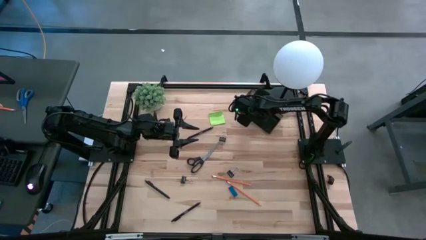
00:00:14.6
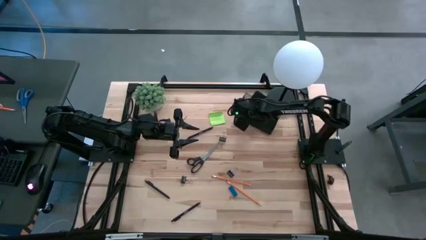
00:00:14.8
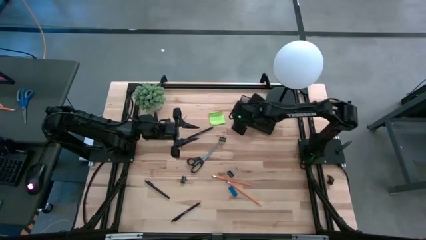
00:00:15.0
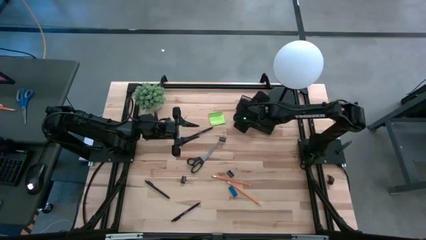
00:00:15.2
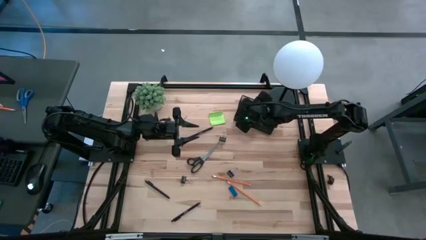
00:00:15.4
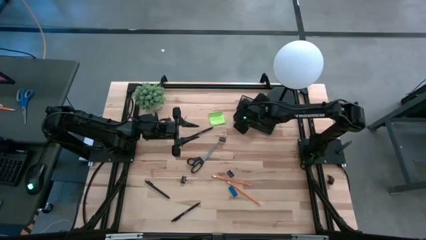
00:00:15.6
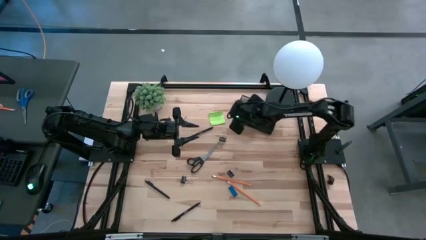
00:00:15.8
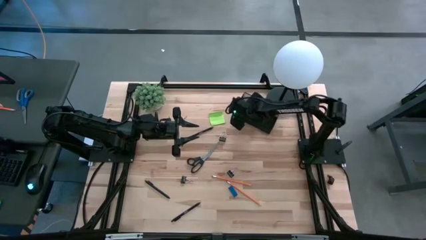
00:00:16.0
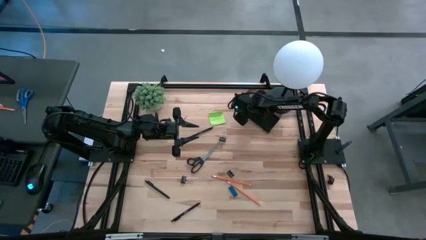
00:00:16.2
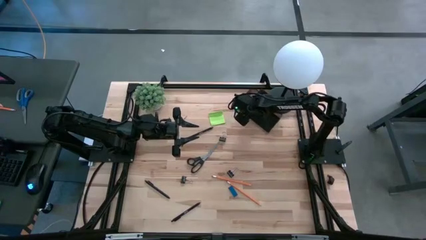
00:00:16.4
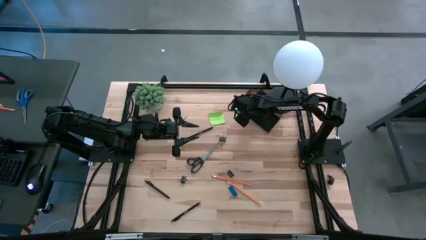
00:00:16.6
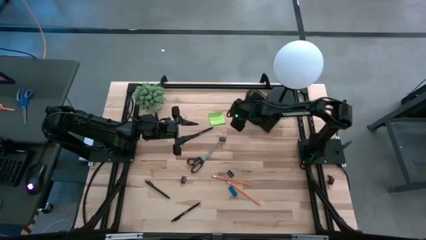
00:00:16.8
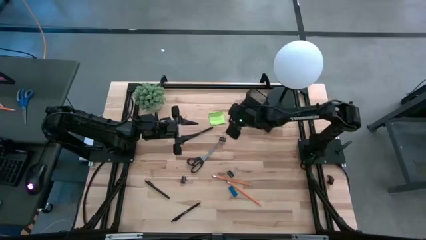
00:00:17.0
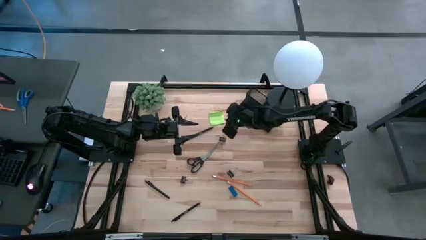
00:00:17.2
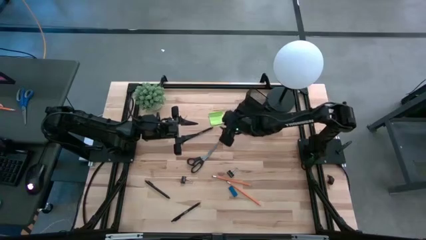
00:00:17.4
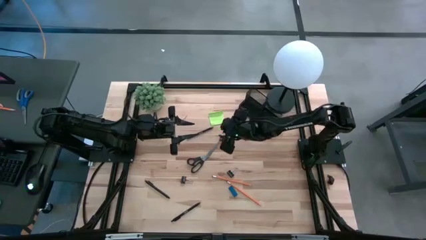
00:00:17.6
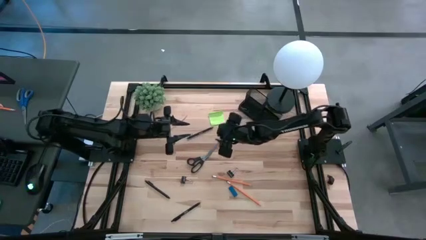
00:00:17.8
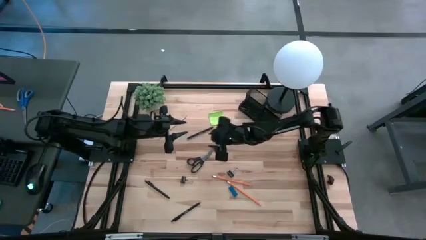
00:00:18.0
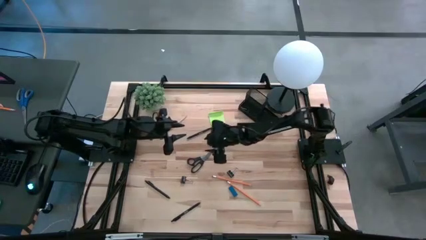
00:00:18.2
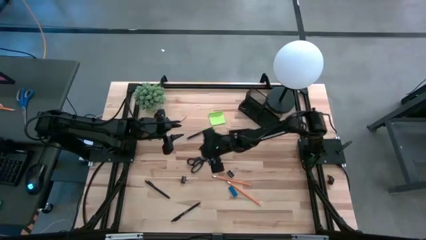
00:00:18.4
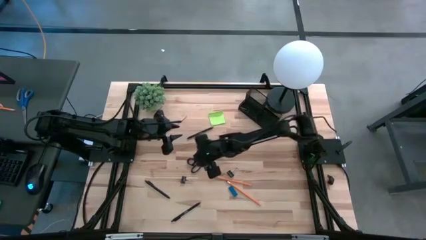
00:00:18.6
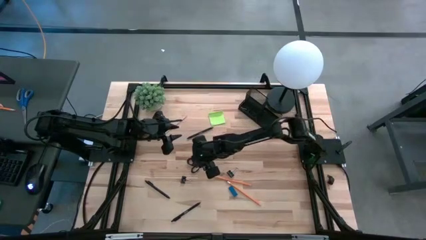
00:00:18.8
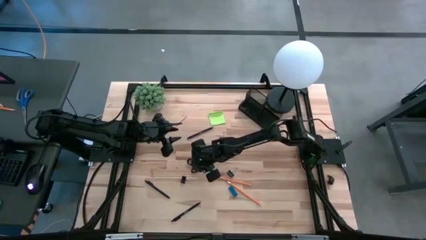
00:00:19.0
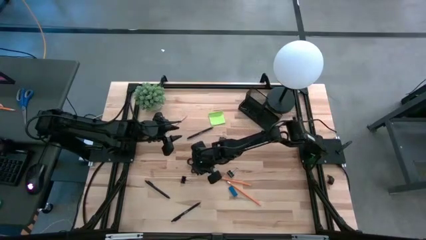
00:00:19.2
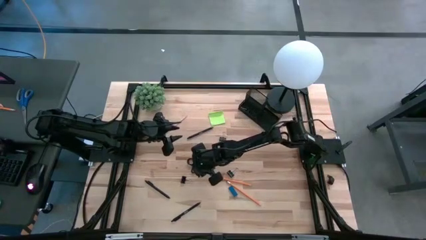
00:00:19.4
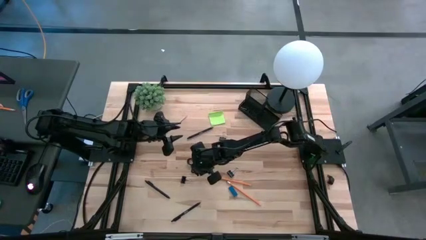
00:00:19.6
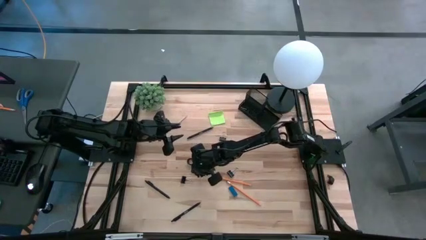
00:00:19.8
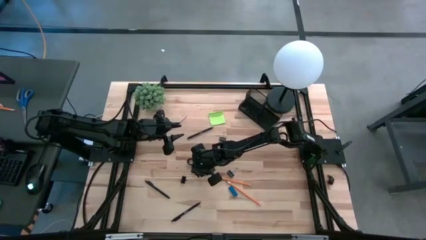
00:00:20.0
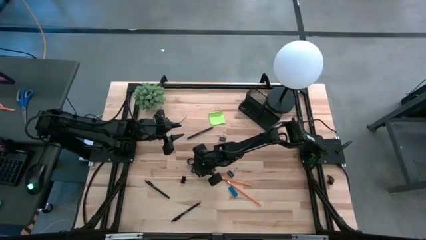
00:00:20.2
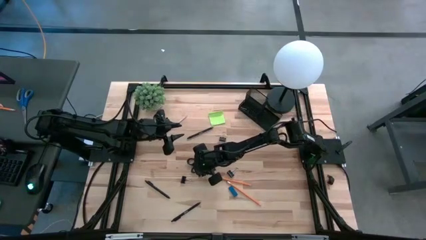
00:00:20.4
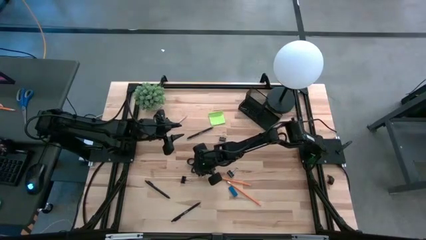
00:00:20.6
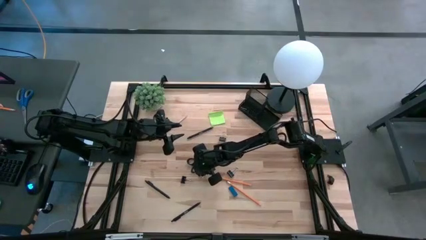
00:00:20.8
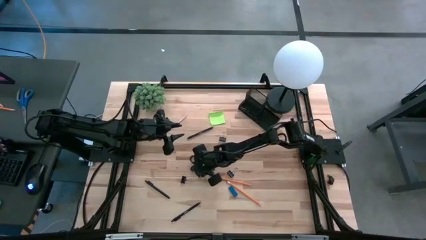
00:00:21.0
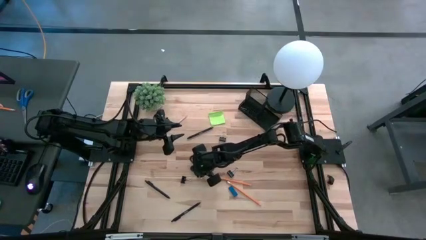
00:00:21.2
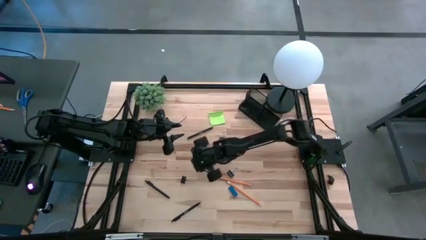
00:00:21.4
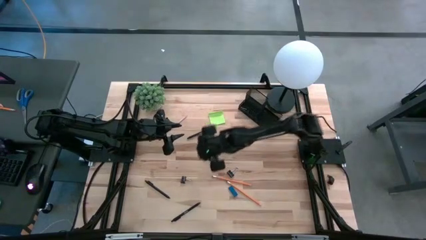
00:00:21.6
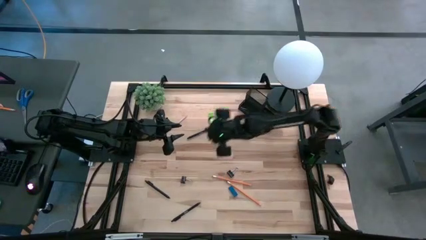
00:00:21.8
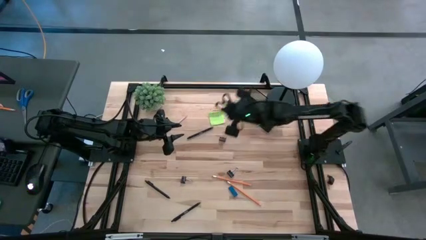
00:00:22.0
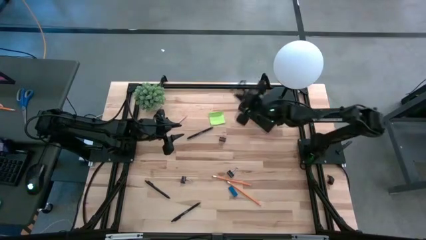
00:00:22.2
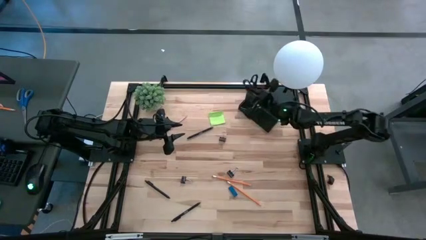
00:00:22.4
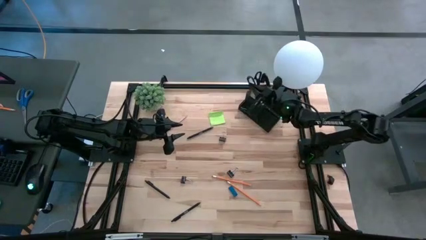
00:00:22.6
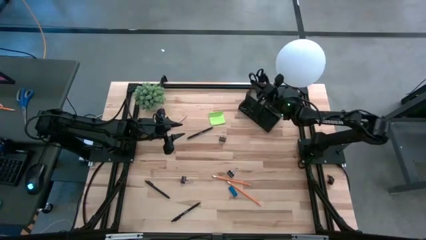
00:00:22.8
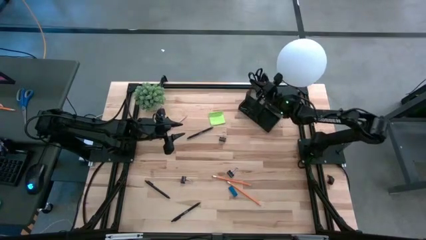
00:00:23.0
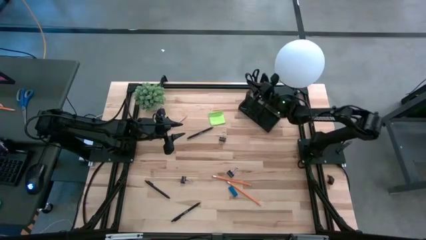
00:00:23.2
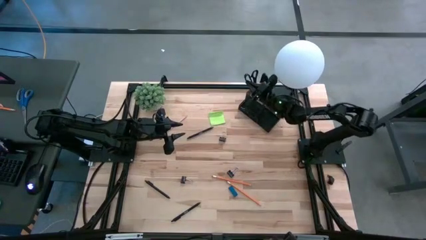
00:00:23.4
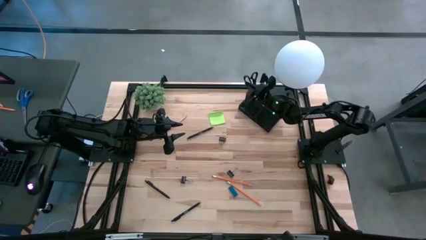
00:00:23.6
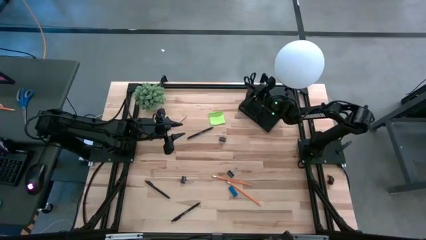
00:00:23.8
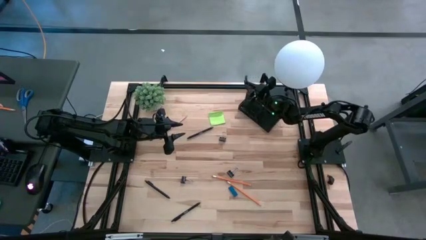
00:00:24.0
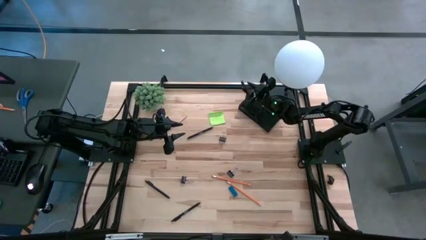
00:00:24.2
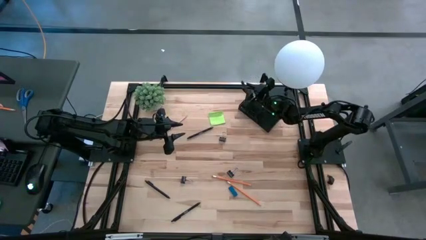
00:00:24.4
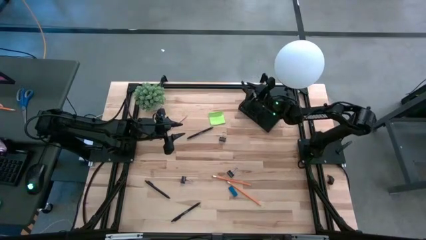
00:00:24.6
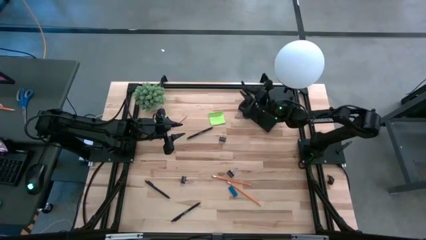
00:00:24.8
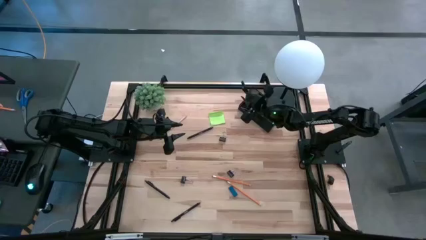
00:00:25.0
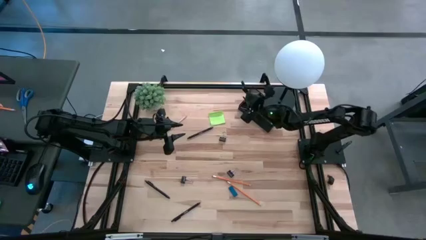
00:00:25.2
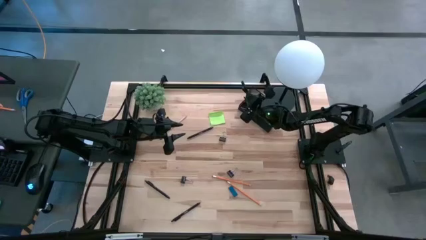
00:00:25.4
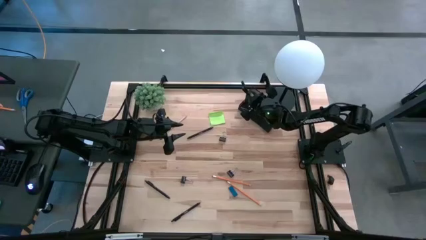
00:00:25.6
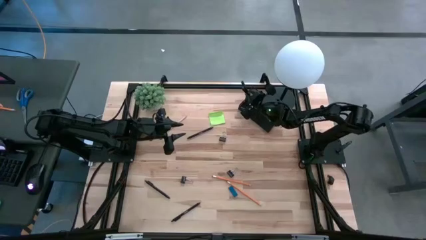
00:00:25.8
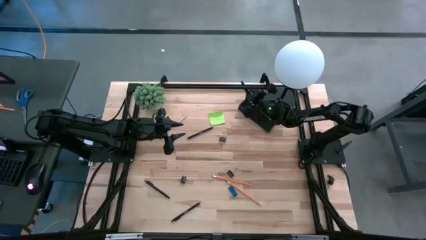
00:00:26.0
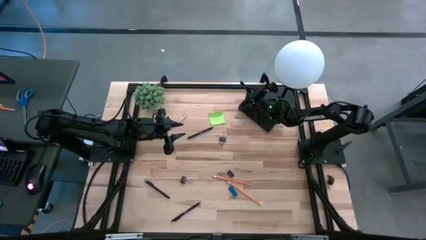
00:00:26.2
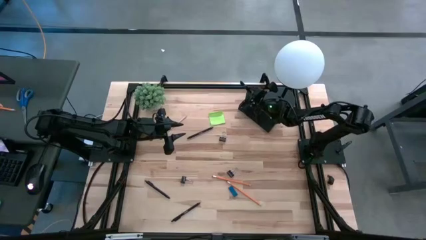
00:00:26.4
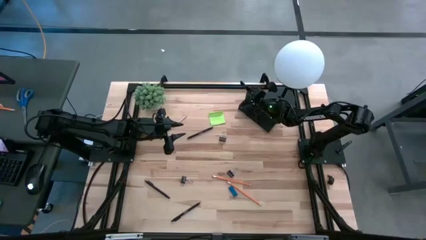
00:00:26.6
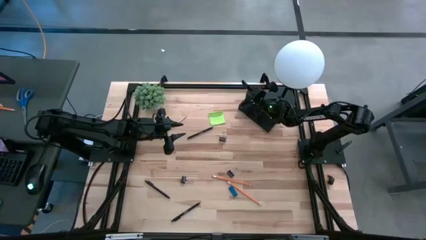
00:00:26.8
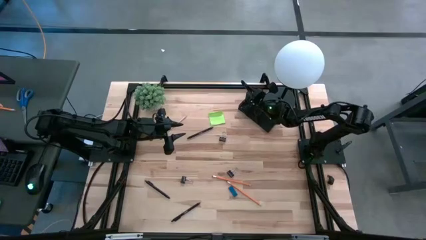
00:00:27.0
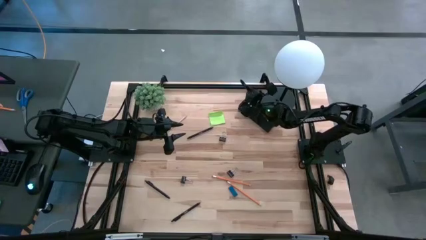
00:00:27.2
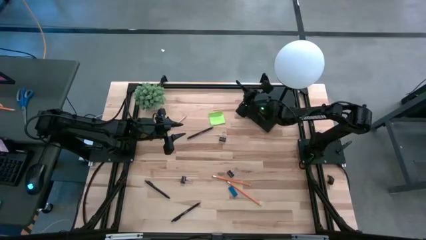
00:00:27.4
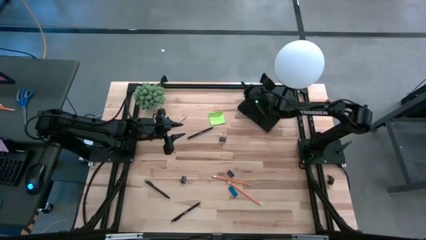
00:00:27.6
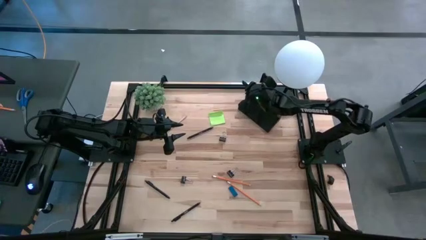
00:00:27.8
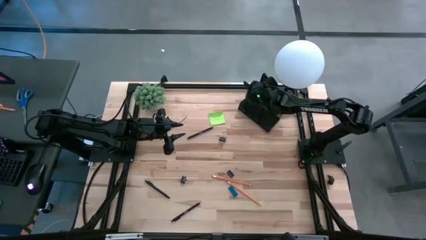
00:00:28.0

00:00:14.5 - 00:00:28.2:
Task: Pick and place office supplies into organizer
Put the black scissors into the black desk organizer

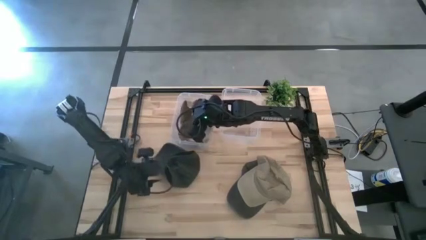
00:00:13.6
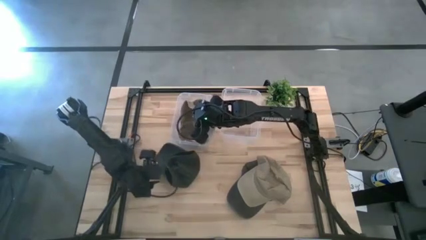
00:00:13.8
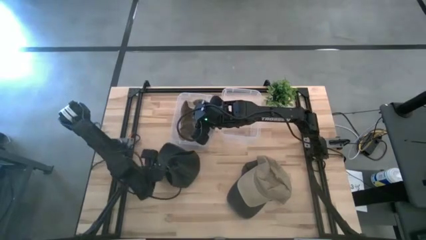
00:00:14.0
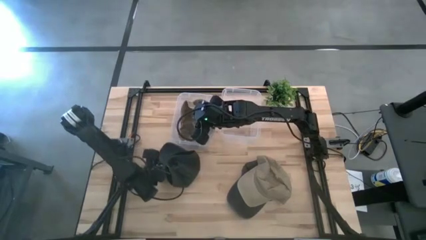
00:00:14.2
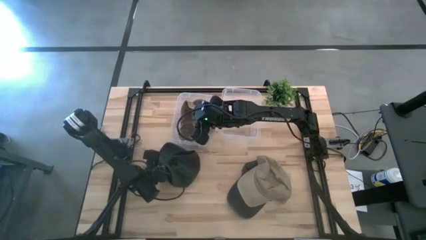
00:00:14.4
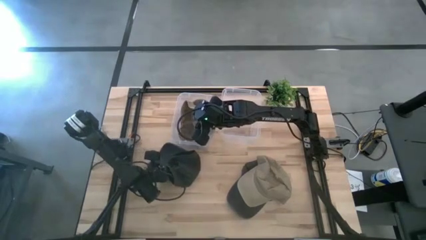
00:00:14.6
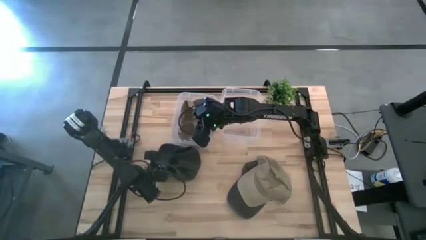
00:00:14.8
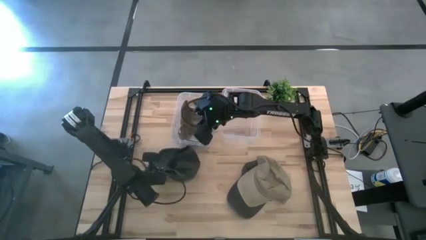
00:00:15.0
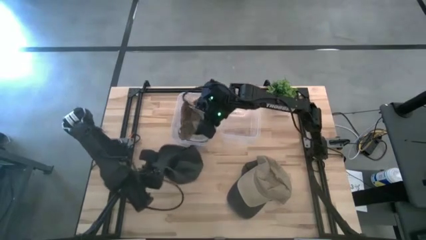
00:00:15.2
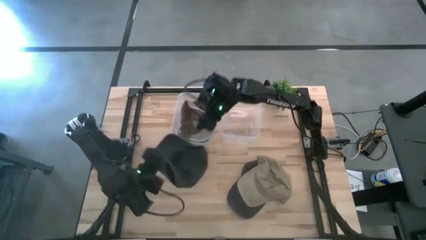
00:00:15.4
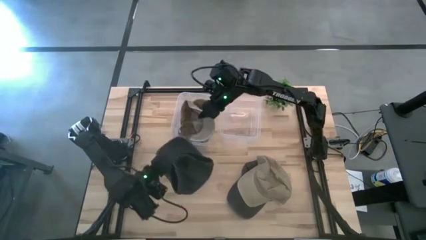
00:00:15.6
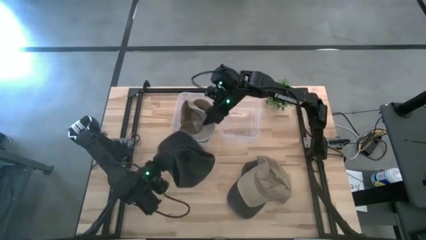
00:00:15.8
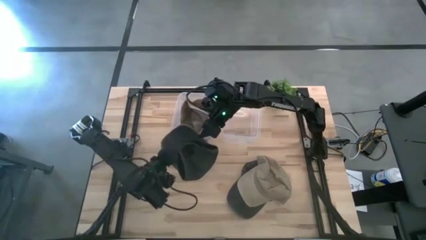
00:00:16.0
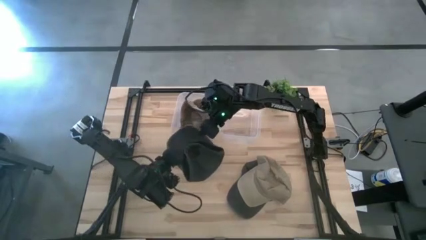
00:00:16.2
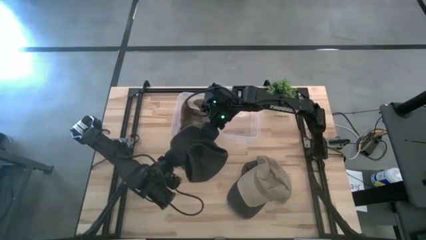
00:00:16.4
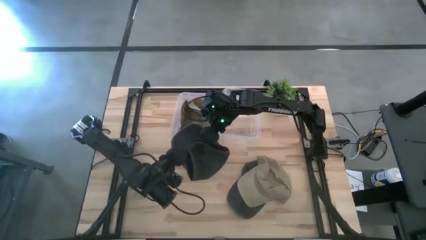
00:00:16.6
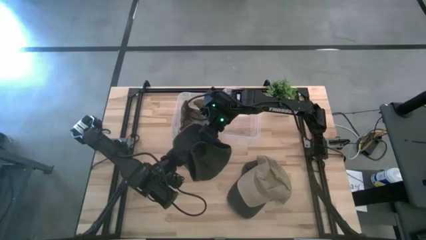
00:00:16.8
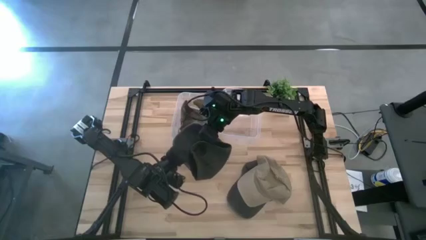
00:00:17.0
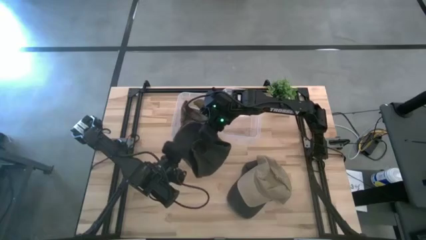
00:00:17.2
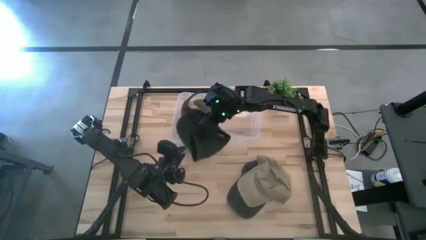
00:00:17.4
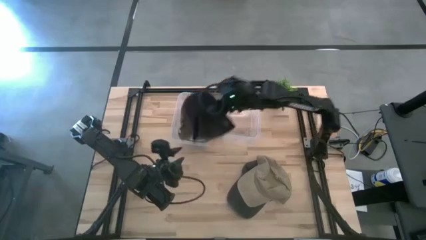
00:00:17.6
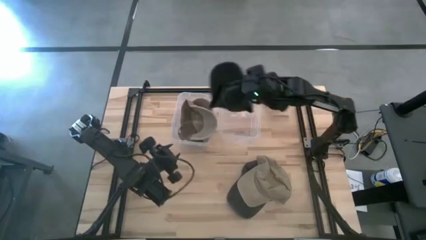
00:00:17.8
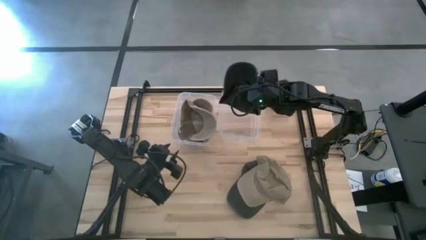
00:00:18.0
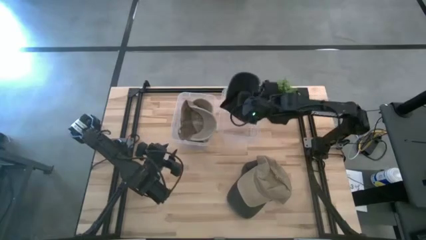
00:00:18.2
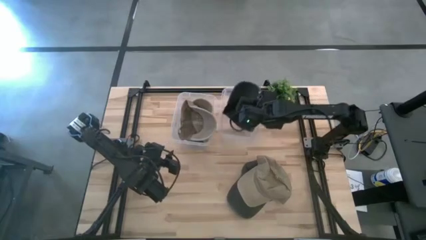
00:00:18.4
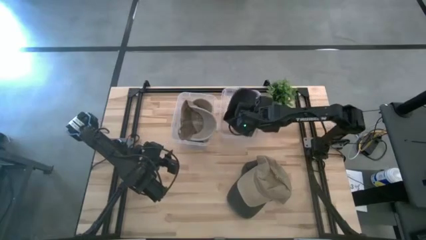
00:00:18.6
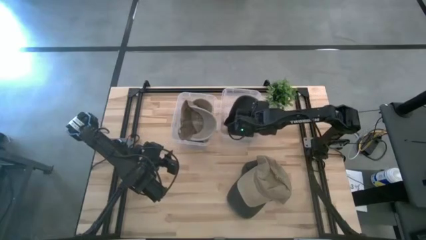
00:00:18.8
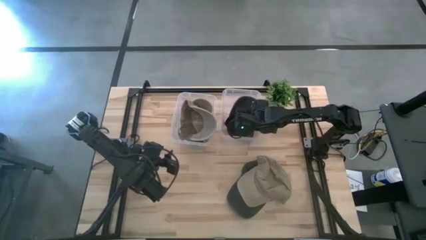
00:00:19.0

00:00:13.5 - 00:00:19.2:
Task: Pick & Place hat
Put the left black cap into the right transparent bin
